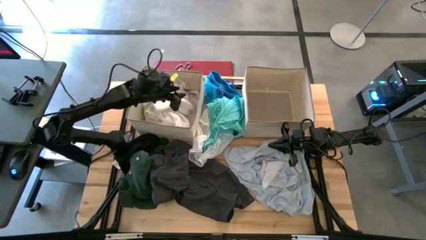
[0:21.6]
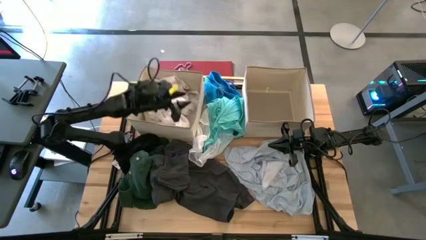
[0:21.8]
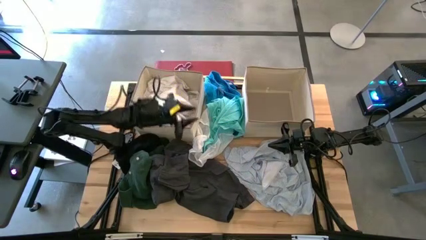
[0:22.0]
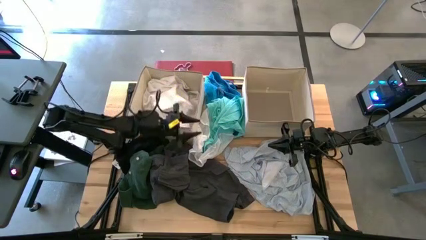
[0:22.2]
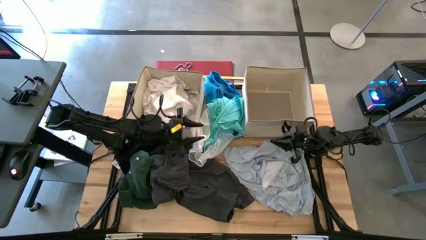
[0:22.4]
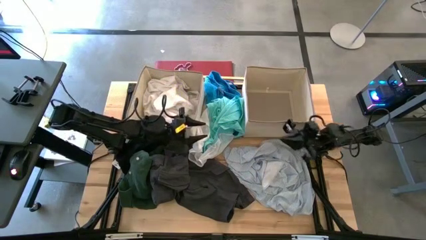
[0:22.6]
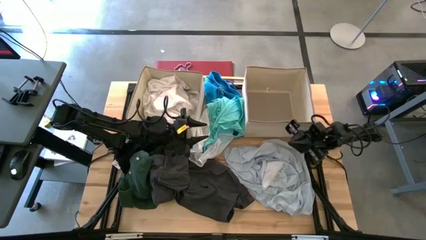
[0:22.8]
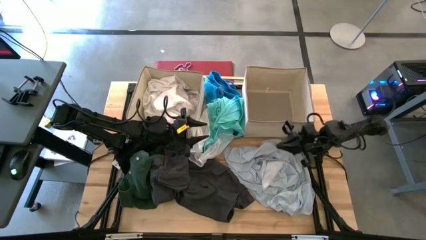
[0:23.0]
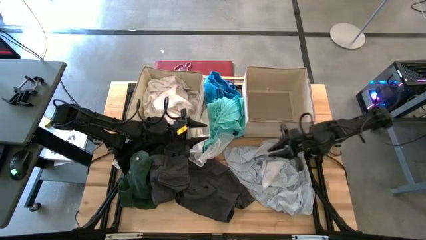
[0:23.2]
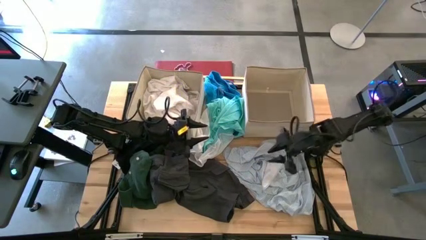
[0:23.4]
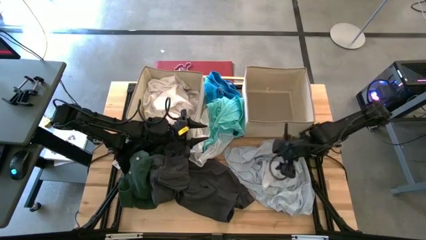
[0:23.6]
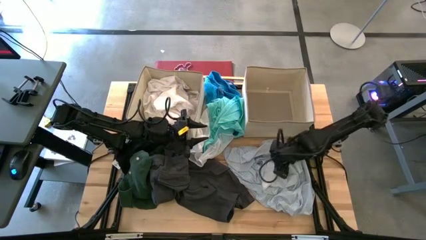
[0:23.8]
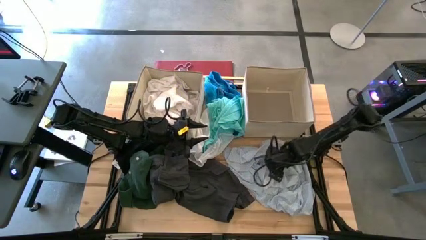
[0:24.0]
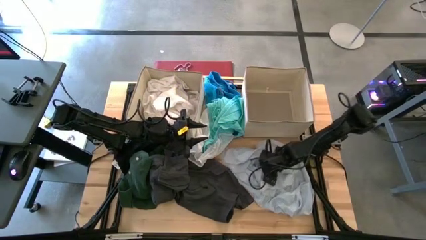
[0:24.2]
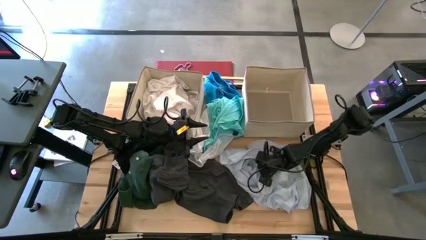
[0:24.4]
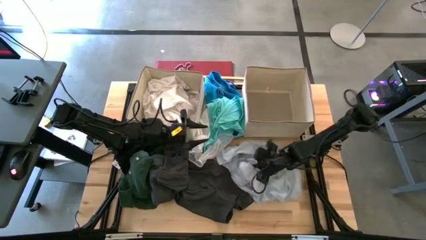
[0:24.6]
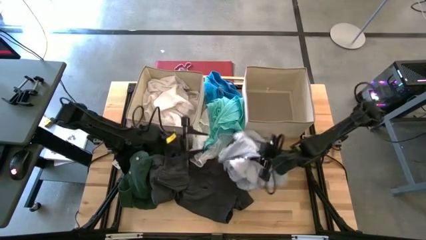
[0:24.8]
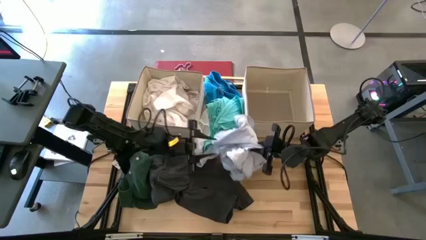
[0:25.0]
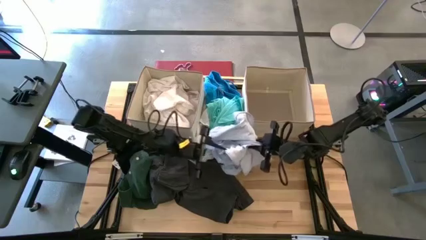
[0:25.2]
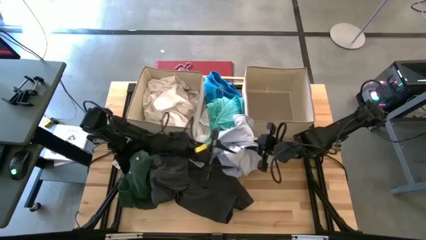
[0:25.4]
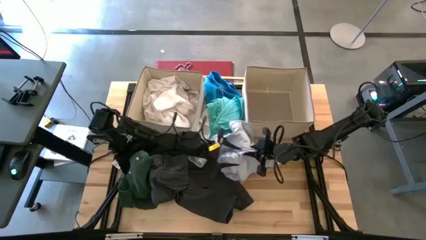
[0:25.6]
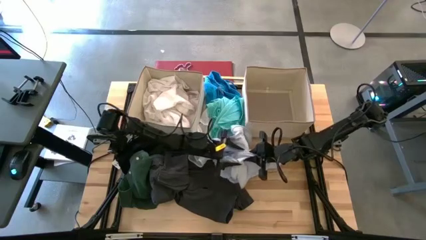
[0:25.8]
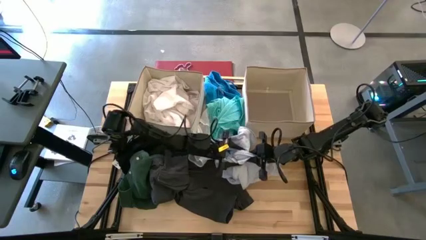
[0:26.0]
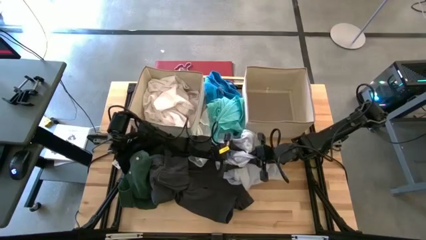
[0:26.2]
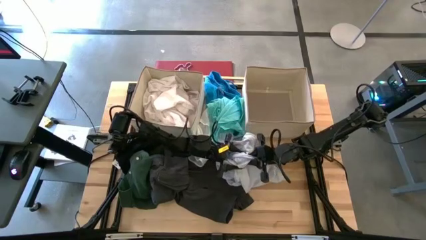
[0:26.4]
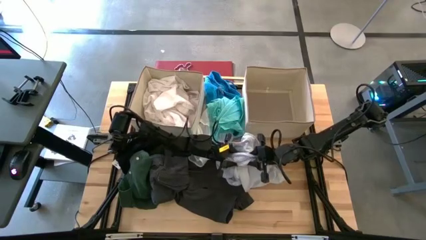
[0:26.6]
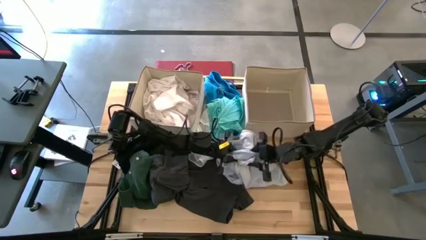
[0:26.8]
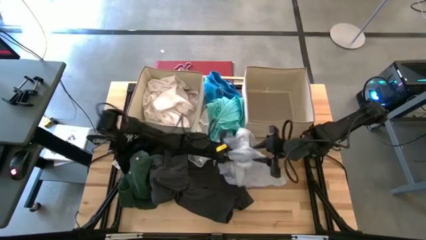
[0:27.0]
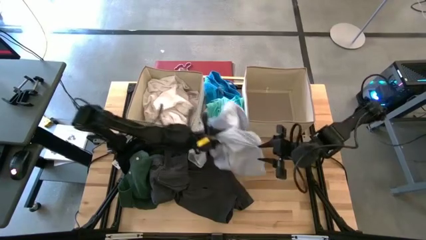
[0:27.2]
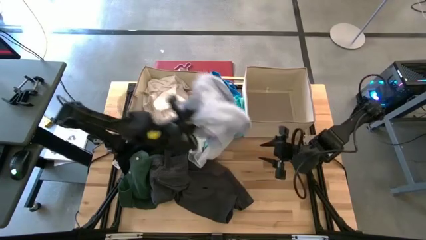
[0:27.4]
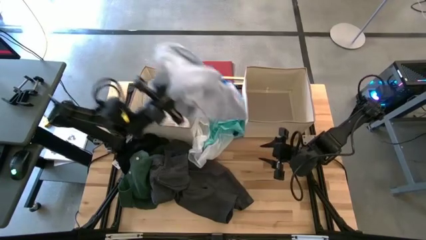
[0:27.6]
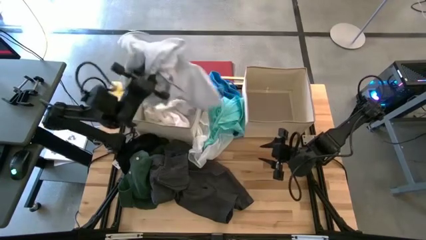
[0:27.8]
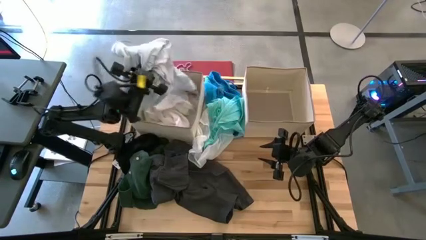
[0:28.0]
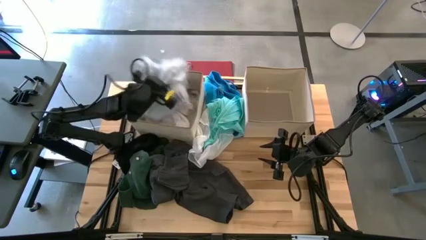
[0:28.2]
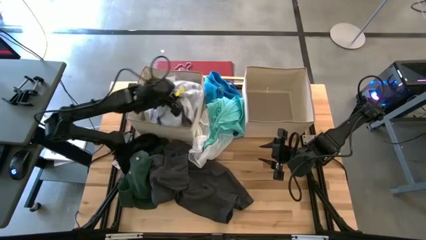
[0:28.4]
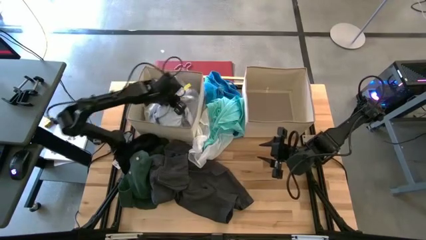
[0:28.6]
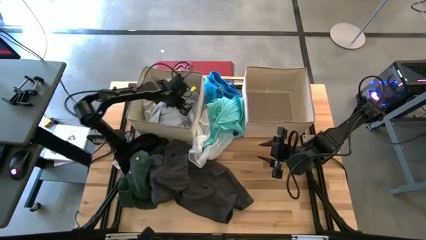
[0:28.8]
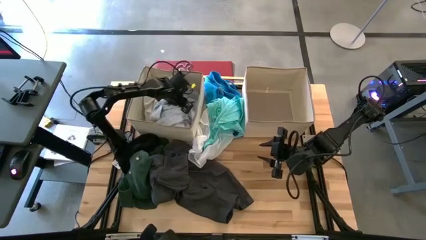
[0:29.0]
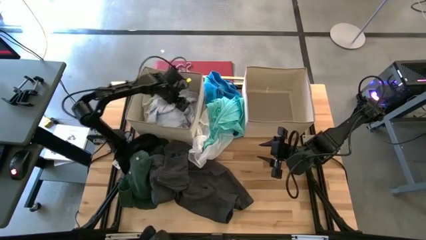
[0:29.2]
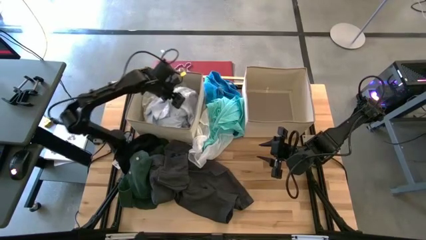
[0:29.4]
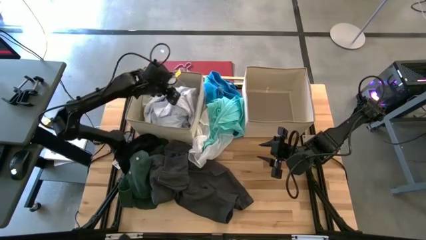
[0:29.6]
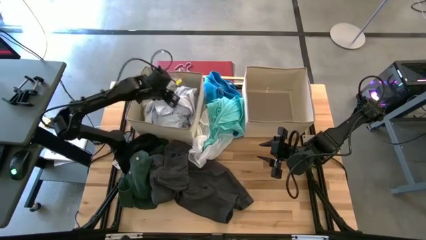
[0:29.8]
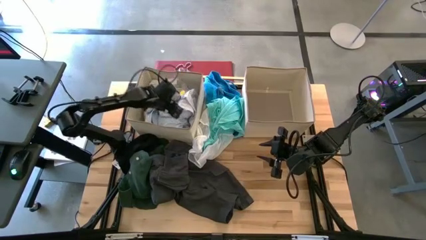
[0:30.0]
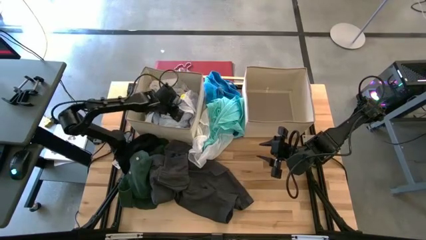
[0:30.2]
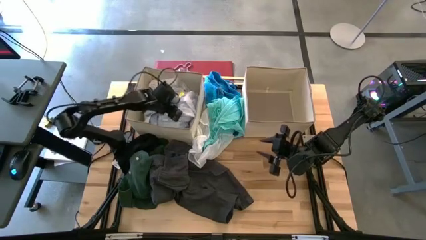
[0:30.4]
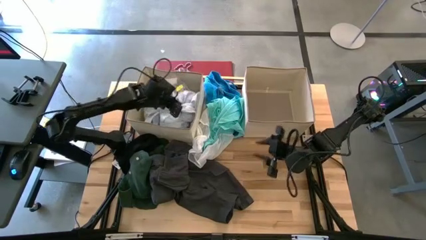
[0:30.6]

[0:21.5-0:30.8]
Task: Sort clothes
Put the blue patterned shirt into the left laundry organizer

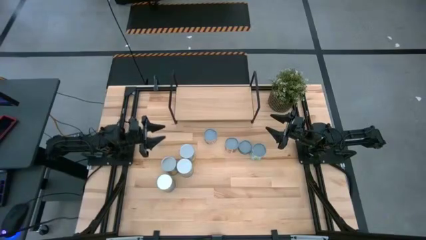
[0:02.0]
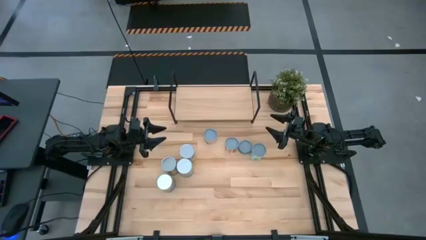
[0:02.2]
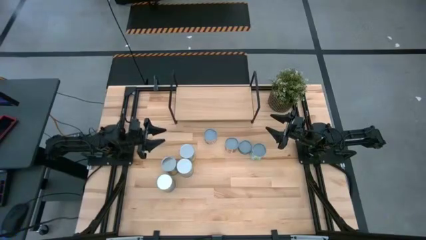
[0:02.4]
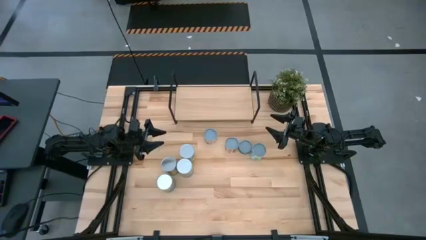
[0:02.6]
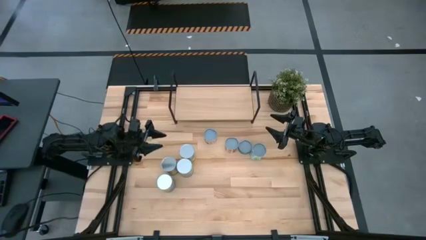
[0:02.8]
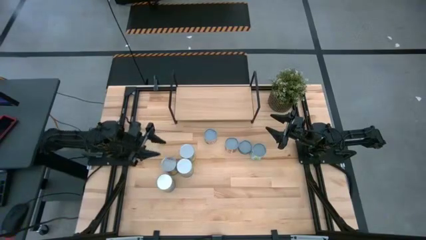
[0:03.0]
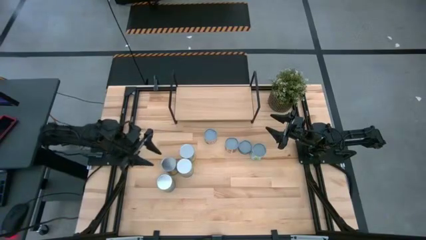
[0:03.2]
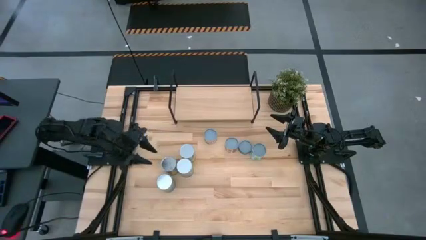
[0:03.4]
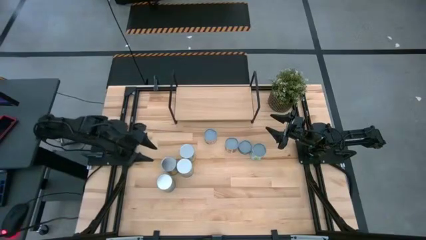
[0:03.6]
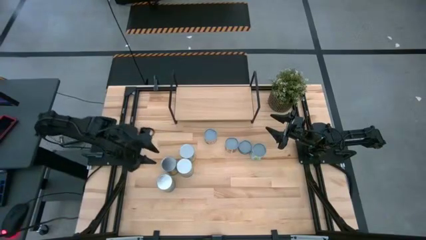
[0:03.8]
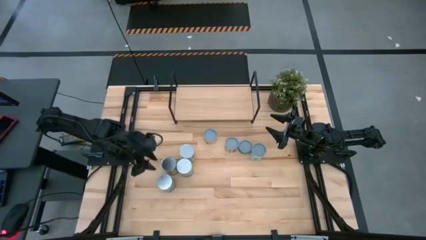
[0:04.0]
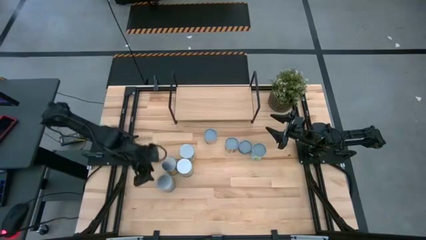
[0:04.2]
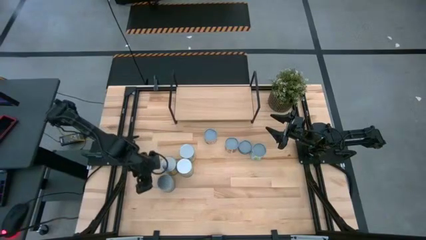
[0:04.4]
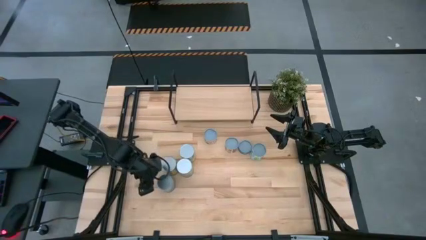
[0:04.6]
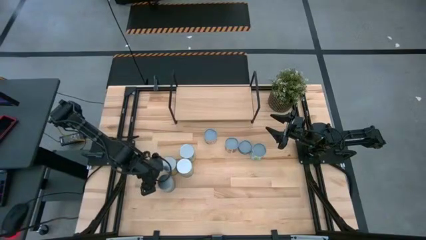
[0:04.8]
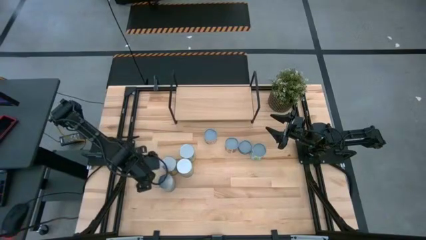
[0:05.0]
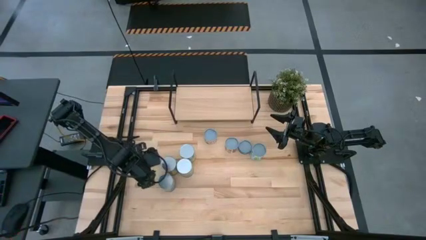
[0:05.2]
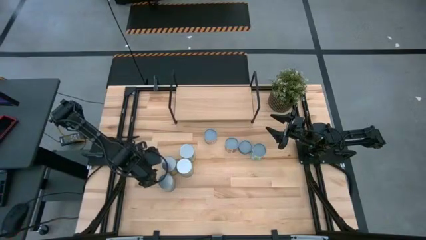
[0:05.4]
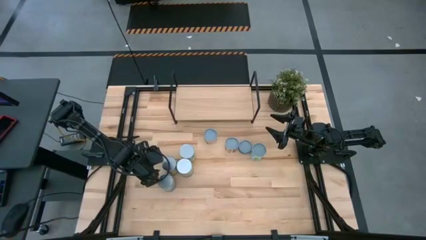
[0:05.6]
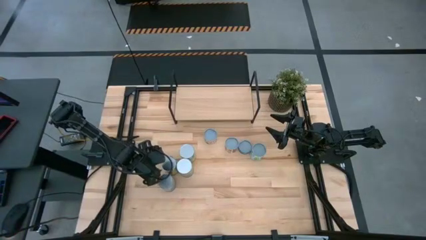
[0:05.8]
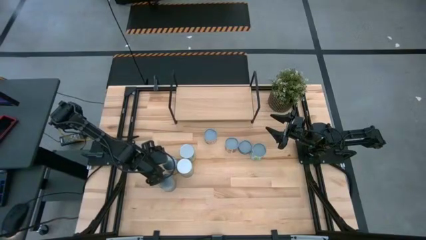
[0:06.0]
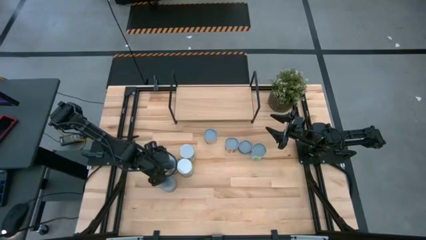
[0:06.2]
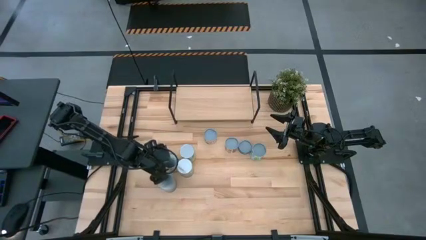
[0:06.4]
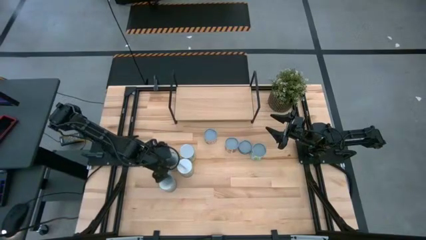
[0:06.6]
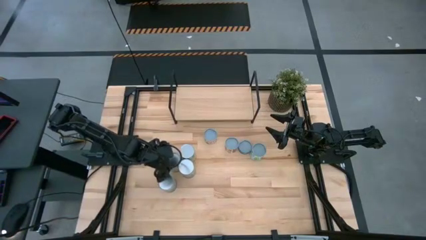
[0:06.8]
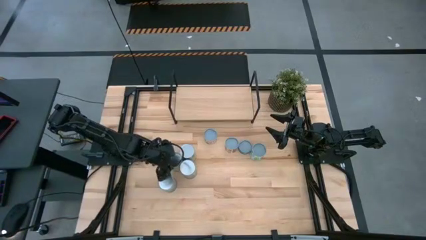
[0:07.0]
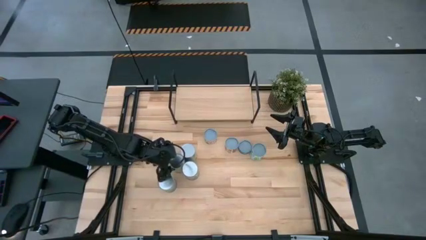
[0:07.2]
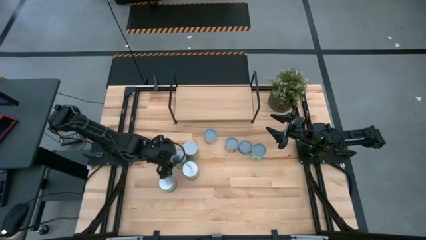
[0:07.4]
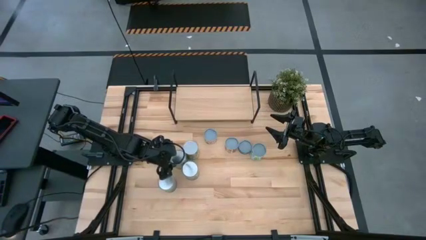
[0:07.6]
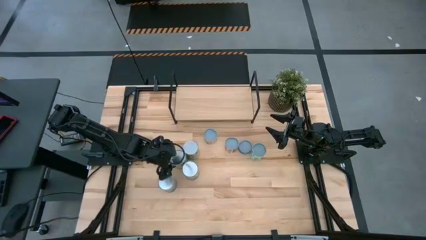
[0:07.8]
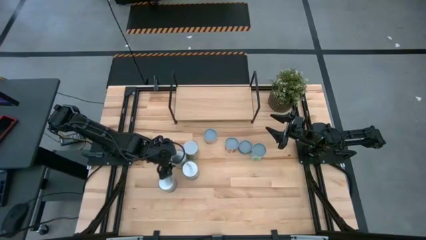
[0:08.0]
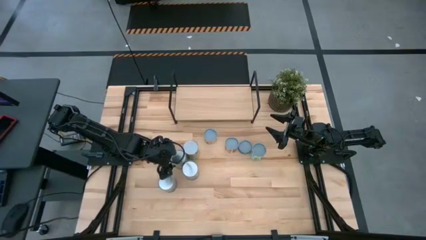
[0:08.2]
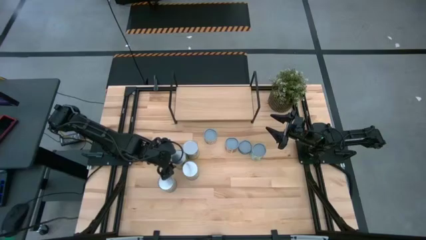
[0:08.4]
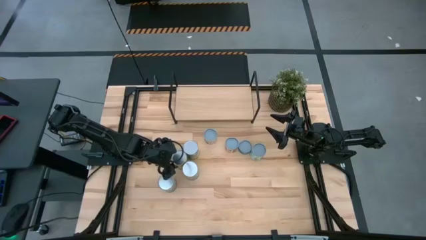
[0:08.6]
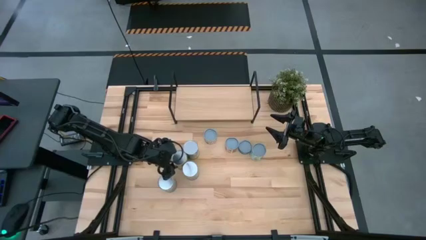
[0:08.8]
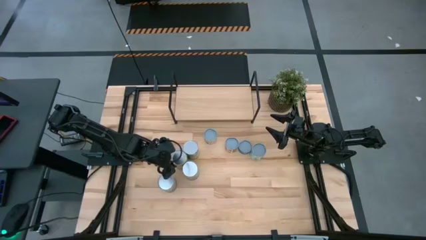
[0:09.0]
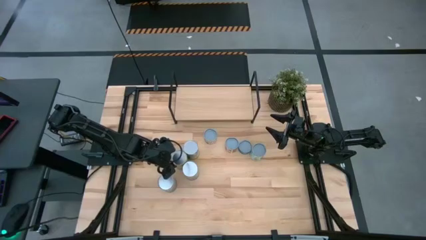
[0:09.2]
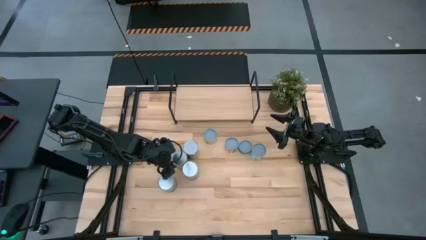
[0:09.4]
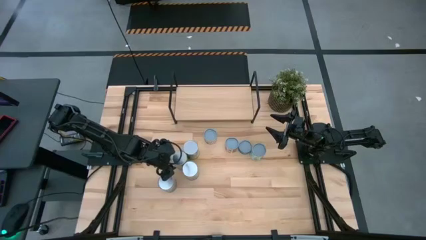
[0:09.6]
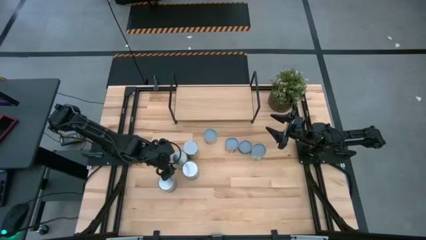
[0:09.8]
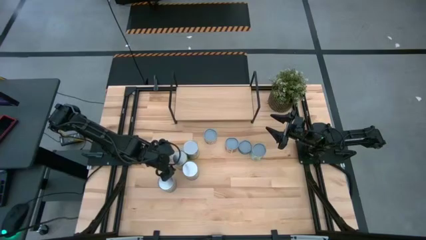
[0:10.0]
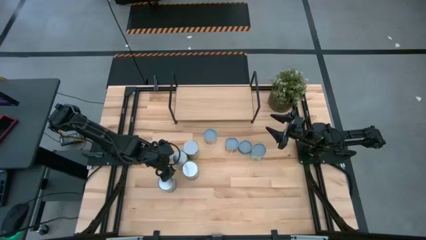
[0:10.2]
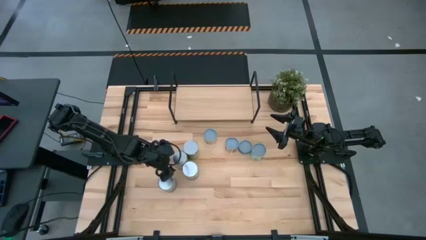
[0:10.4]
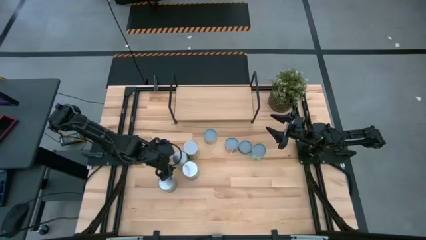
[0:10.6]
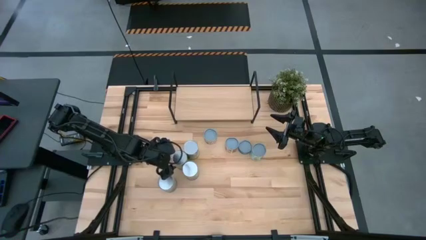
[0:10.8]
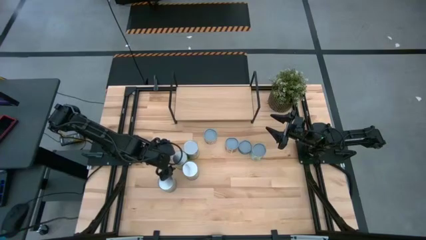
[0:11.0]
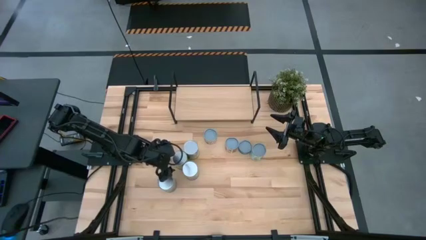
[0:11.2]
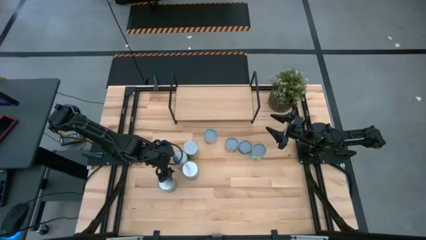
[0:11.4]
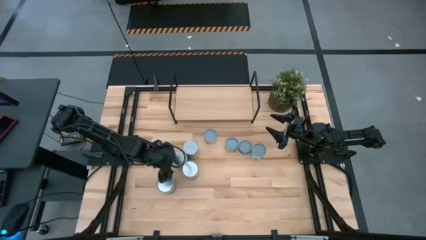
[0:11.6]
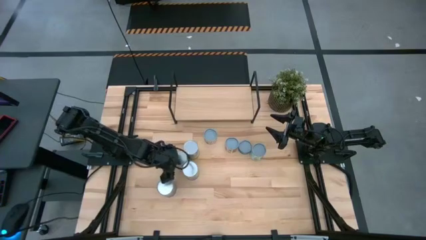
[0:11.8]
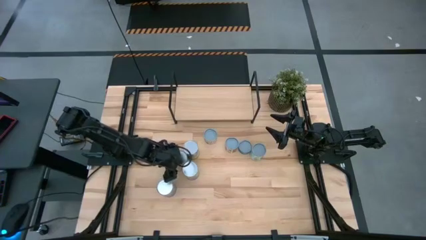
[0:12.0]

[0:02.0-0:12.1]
Task: Pick and place cans onto a shelf
Put the canned oranges on the shelf
